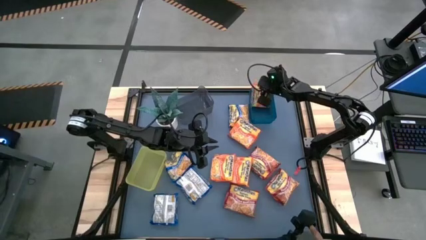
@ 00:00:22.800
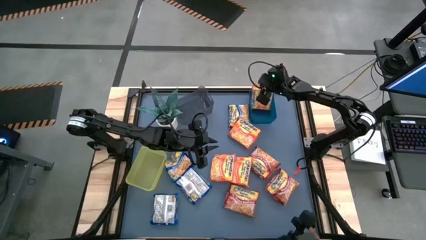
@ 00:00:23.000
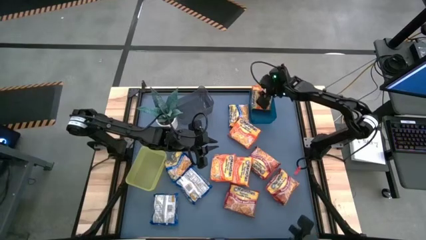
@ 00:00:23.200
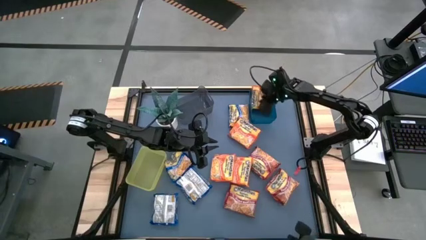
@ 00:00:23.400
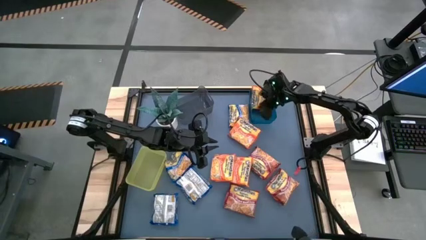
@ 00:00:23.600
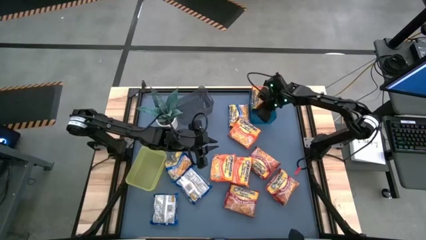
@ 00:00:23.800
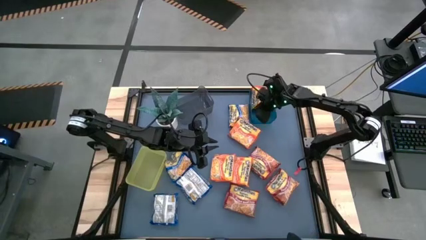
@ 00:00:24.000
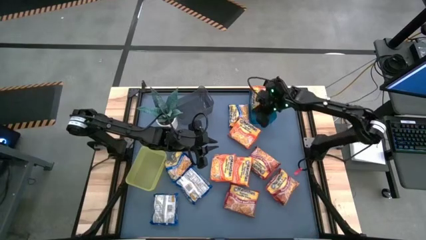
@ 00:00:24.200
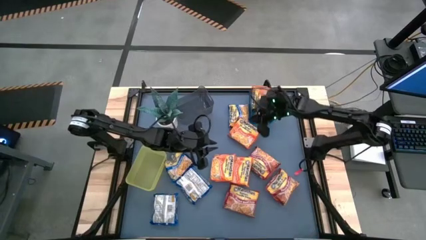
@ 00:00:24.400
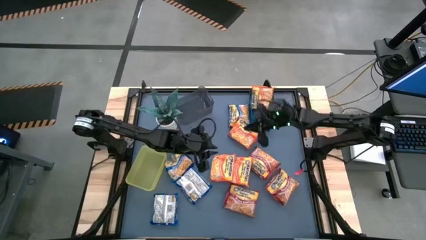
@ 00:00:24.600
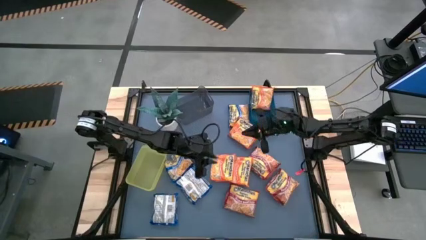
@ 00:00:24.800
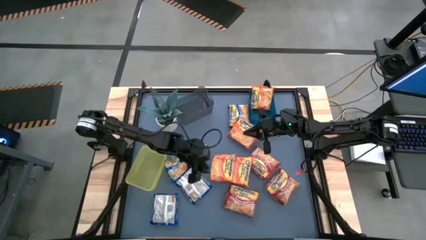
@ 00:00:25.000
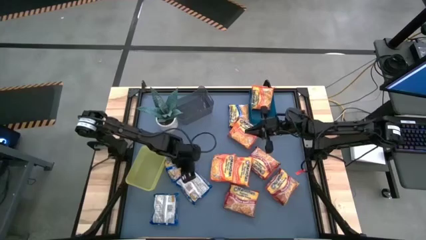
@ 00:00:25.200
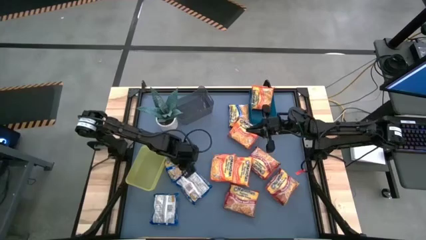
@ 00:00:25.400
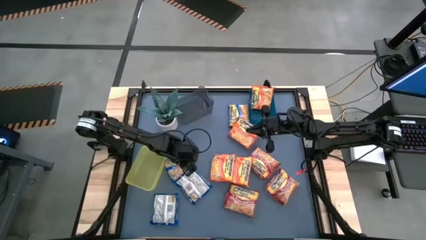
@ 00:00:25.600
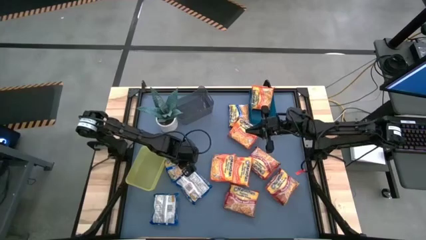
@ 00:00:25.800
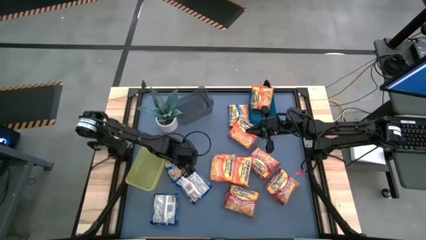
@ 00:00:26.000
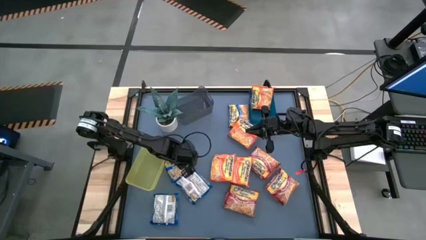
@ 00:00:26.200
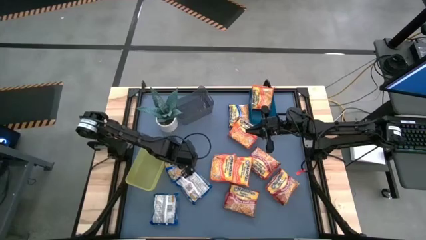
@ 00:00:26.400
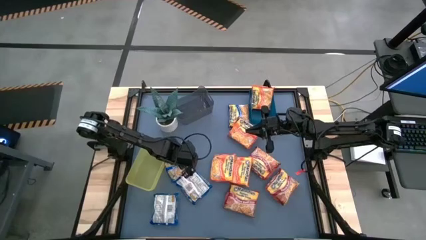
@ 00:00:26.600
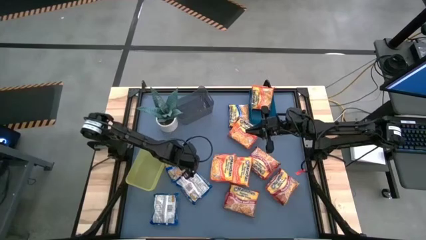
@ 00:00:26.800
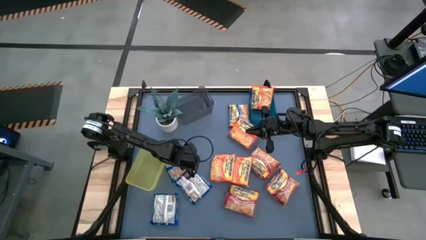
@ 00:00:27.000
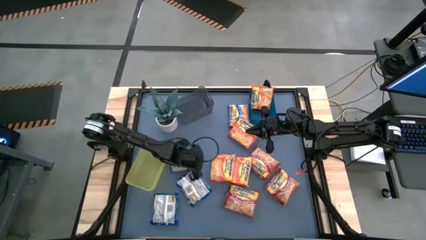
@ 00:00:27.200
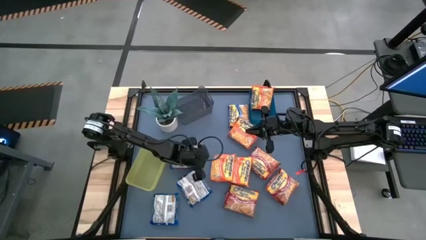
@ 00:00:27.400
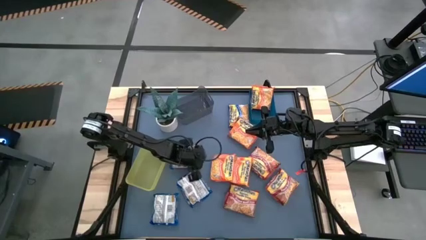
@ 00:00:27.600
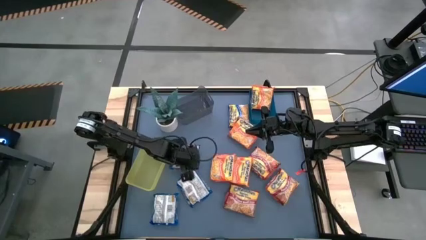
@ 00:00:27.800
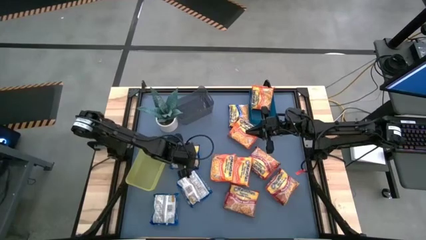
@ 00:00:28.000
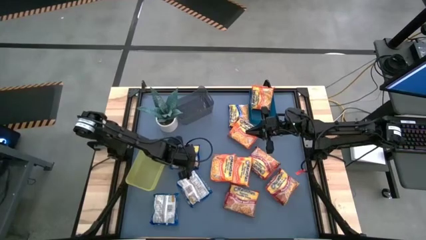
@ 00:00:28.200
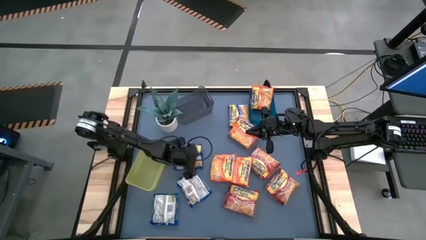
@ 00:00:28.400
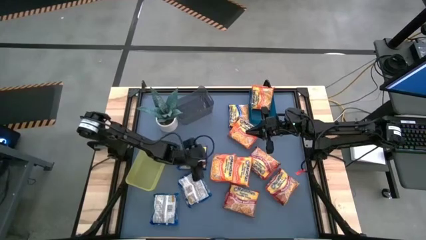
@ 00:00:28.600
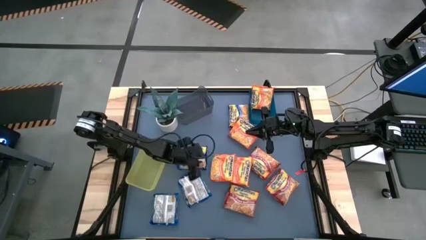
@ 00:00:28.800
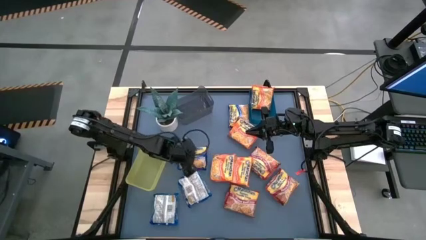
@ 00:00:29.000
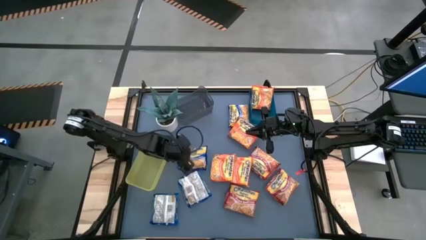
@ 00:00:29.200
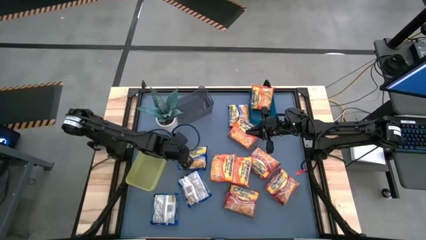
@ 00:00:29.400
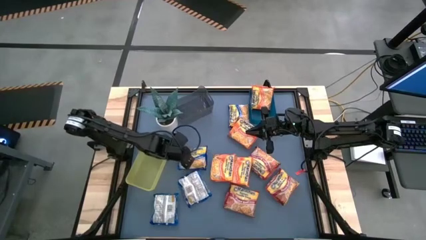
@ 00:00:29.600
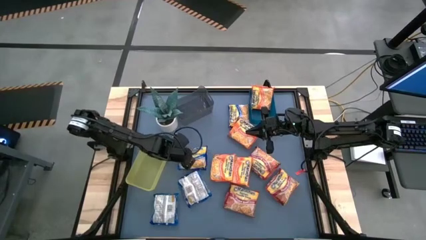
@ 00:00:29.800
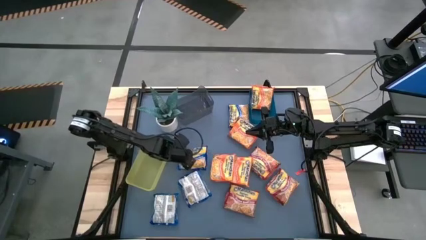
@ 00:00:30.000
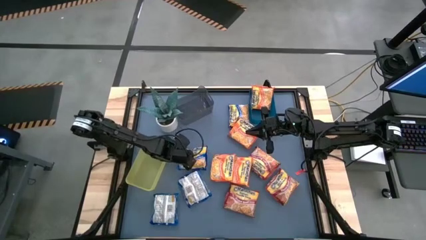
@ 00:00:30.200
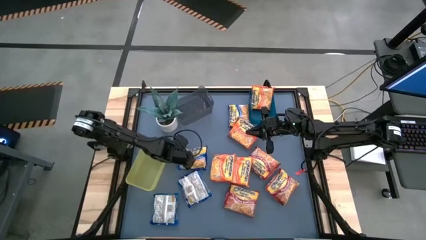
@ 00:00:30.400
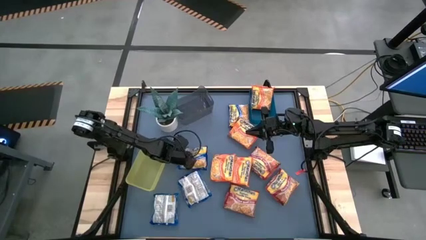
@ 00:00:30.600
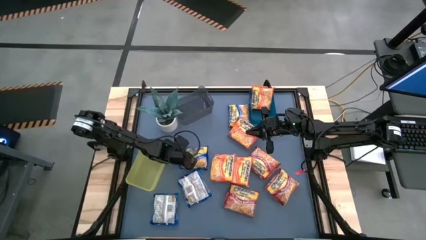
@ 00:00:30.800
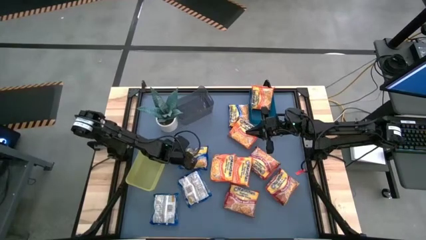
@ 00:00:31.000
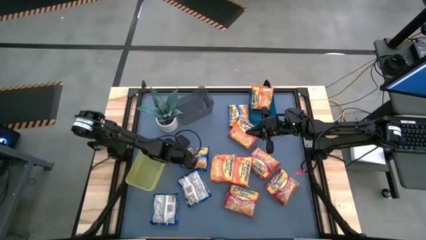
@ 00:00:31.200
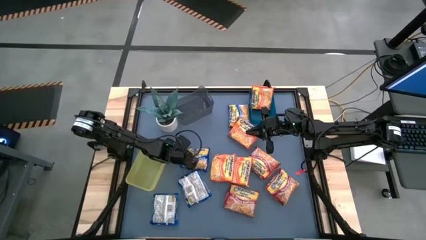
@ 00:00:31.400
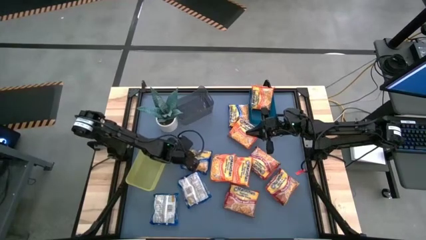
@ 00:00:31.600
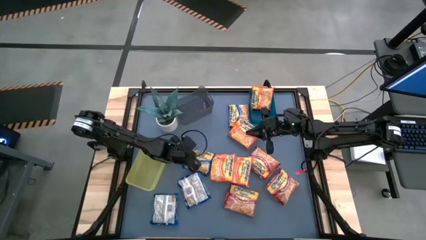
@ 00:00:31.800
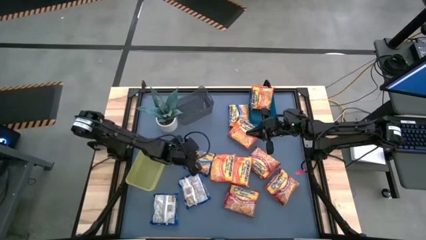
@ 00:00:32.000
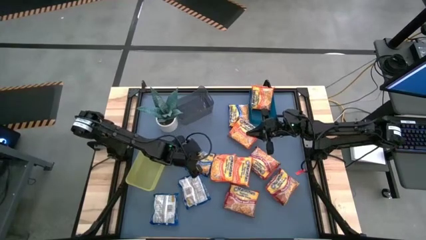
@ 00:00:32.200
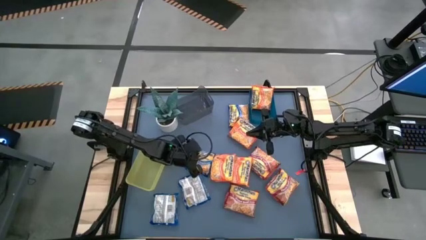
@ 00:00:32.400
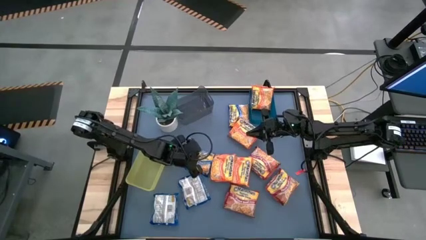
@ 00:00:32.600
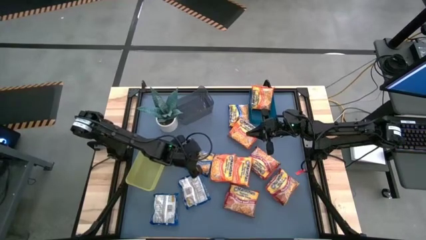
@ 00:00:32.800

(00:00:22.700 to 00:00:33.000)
Task: Sort Maruchan noodles
Put the blue noodle pack into the yellow bin

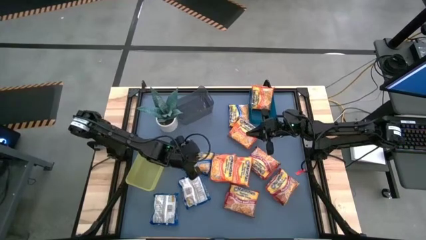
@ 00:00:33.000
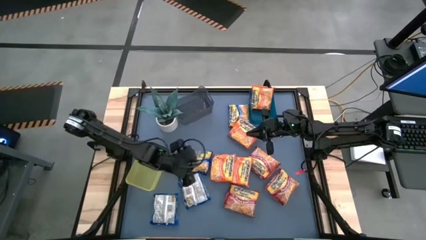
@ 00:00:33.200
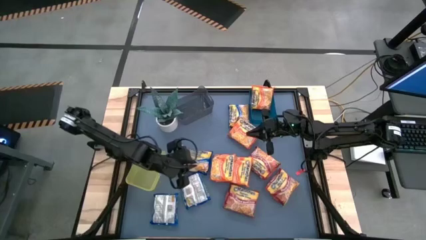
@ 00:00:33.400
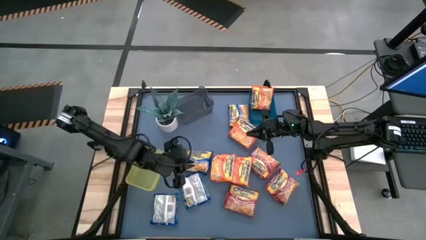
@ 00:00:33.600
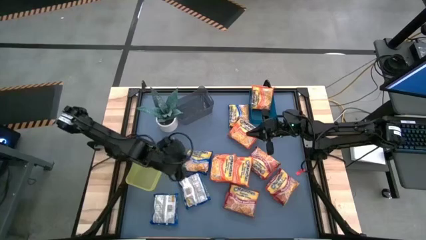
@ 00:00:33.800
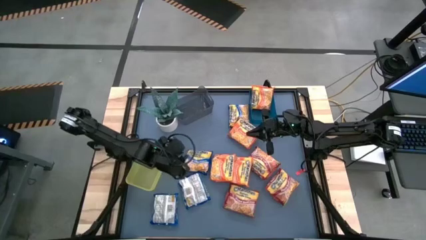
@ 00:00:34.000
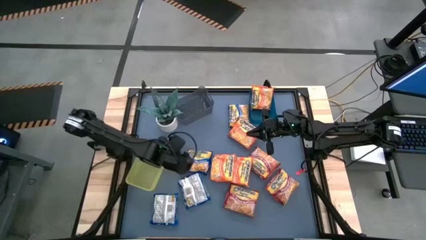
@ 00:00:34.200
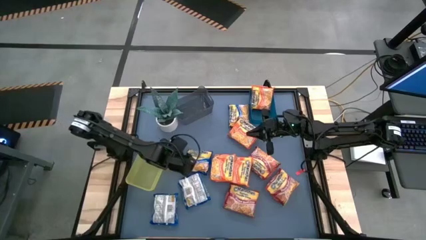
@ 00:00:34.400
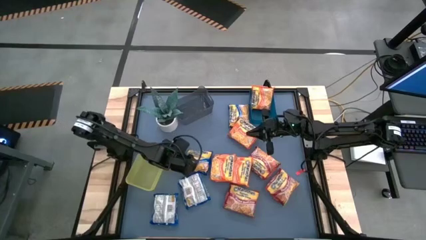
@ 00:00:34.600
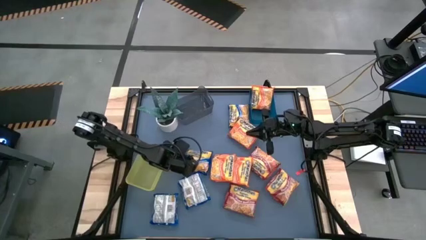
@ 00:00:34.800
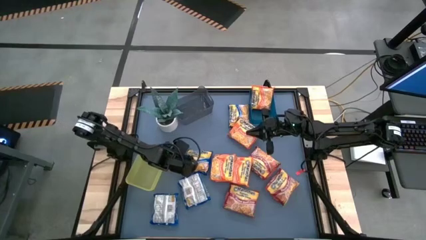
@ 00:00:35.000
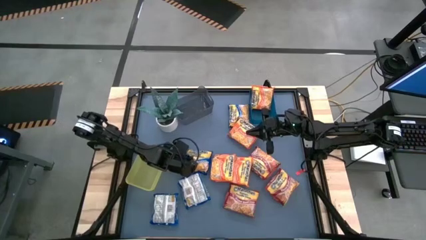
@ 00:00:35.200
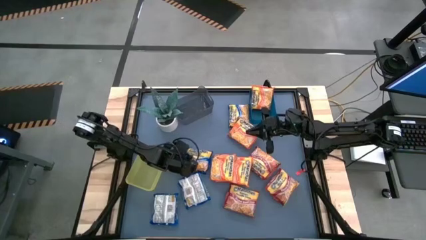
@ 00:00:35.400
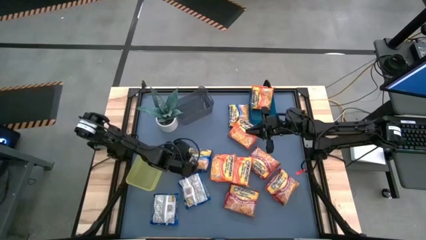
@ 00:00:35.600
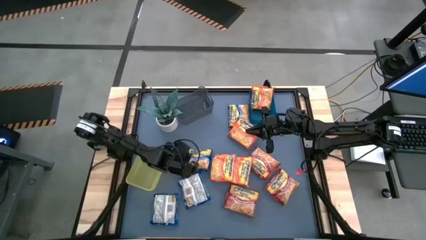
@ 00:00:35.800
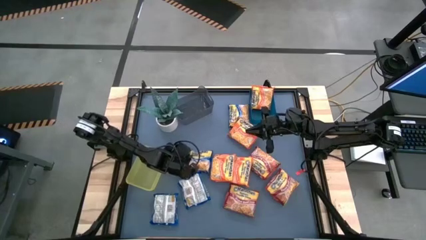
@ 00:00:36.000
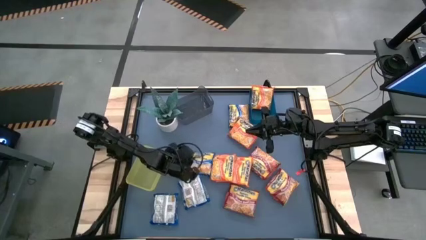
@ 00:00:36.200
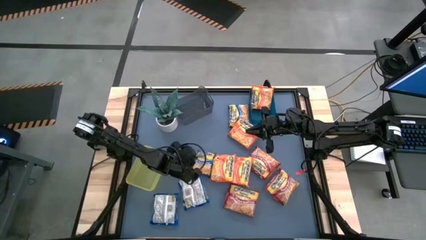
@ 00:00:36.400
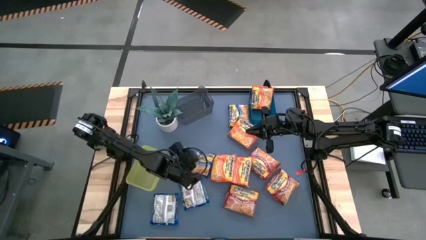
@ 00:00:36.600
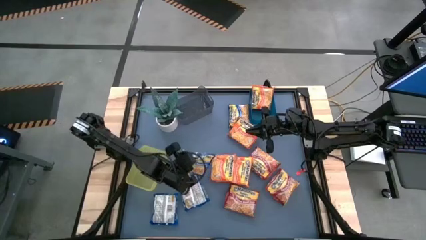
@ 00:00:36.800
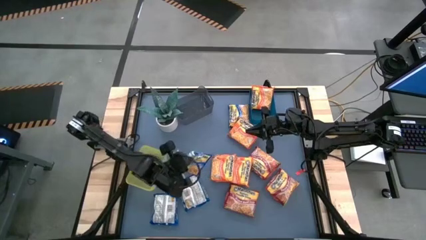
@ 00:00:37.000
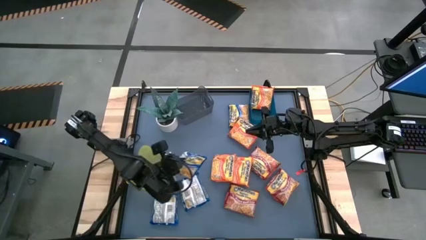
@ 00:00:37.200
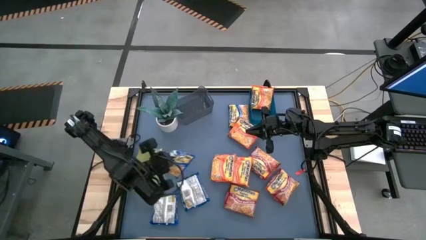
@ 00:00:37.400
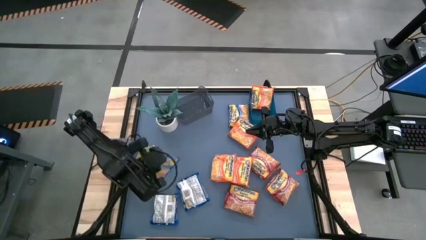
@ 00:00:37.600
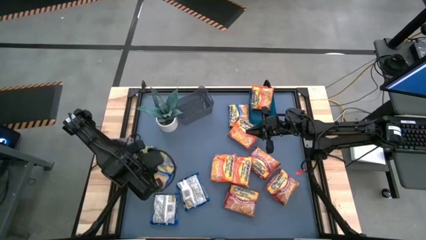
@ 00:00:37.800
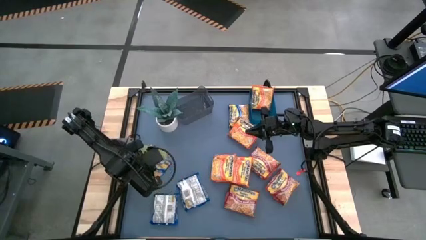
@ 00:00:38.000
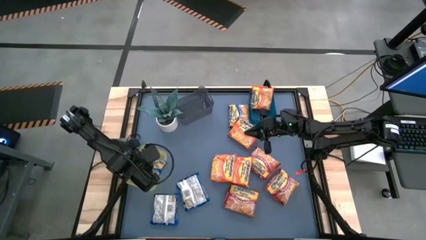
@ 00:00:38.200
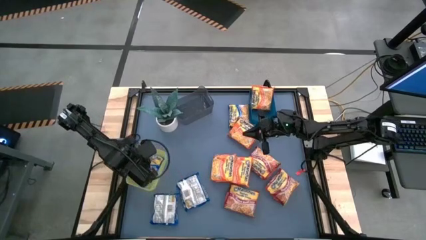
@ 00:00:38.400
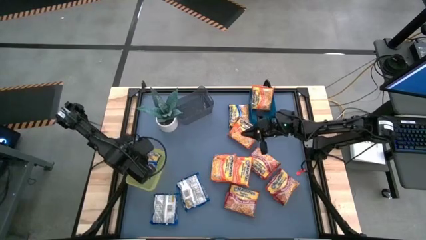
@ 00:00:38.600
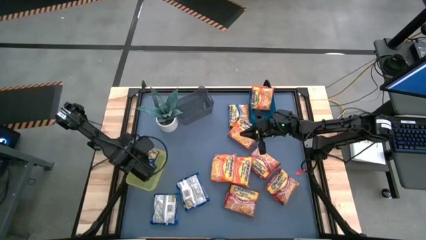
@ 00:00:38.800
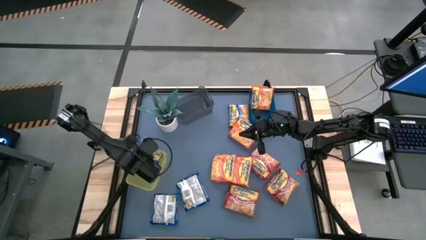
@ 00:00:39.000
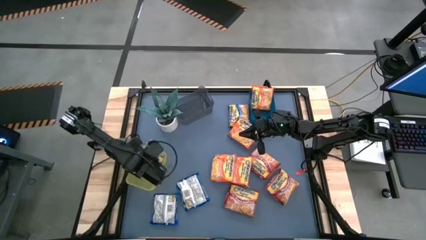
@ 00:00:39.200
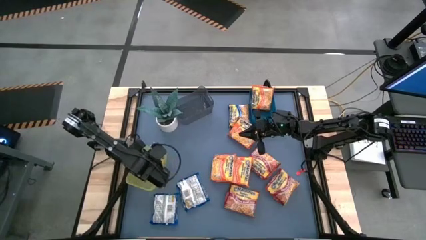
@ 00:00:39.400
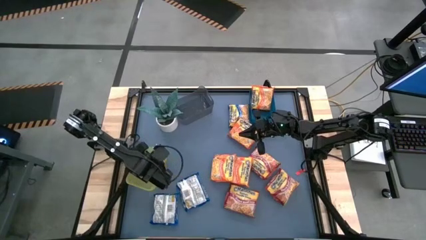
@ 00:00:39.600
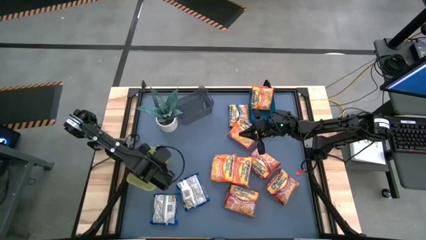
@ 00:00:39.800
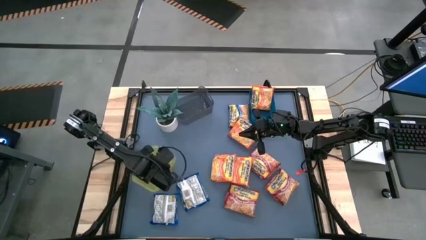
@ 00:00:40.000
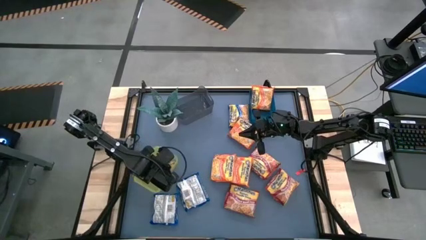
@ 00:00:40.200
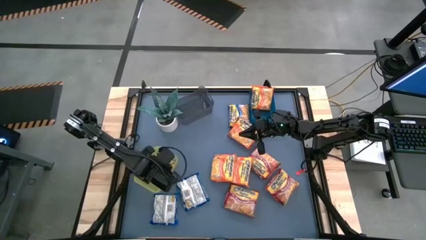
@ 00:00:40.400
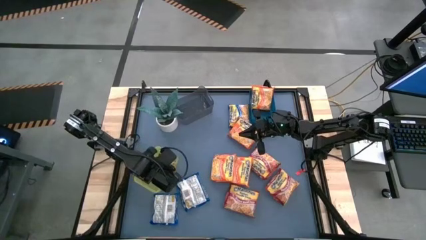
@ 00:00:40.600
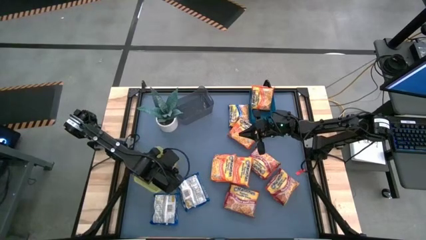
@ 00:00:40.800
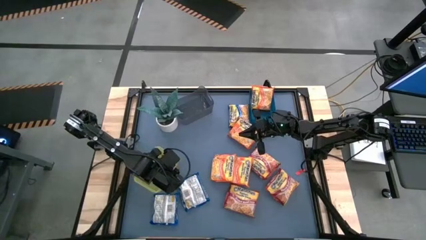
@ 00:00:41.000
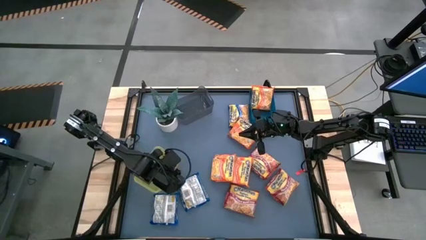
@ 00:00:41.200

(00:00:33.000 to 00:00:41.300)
Put the blue noodle pack into the yellow bin
